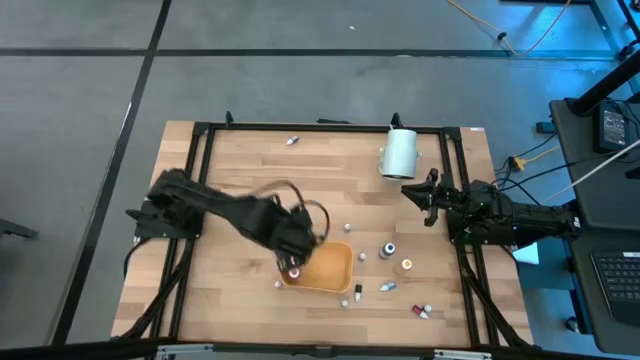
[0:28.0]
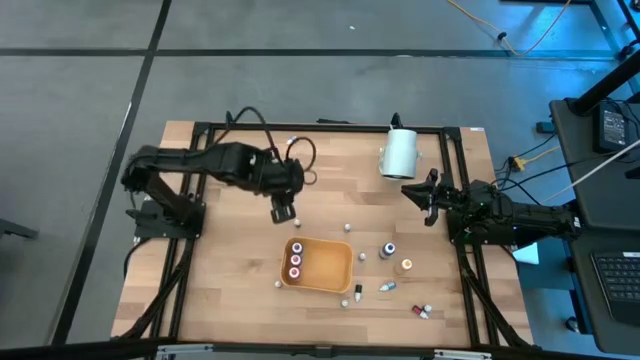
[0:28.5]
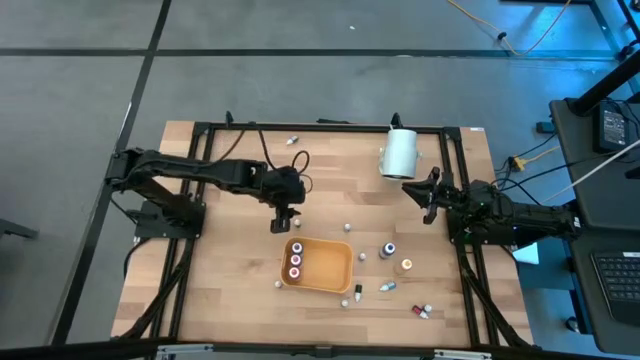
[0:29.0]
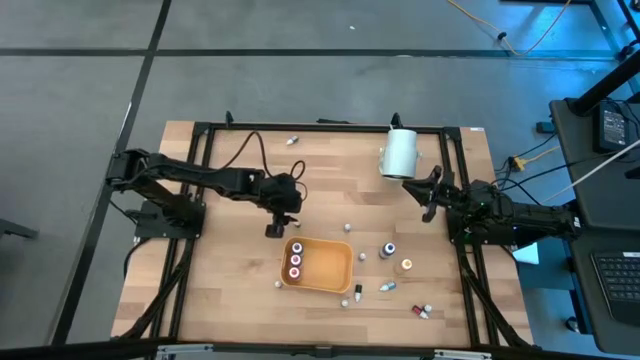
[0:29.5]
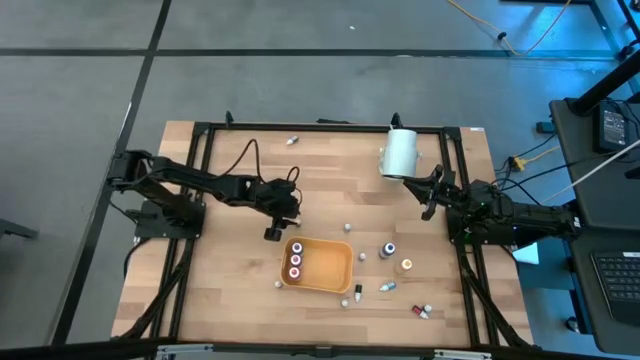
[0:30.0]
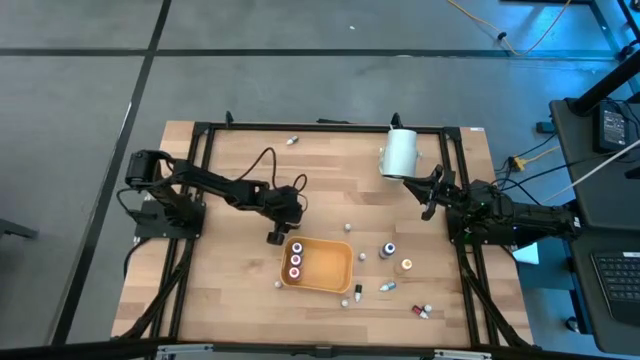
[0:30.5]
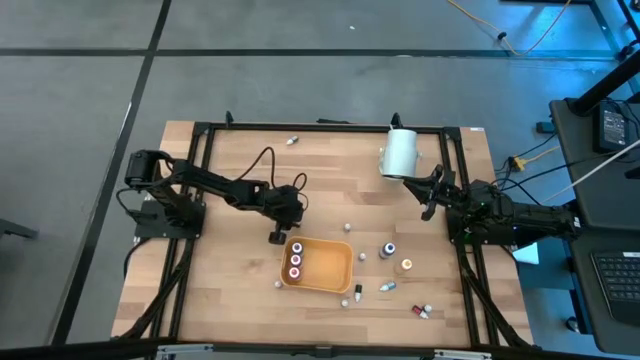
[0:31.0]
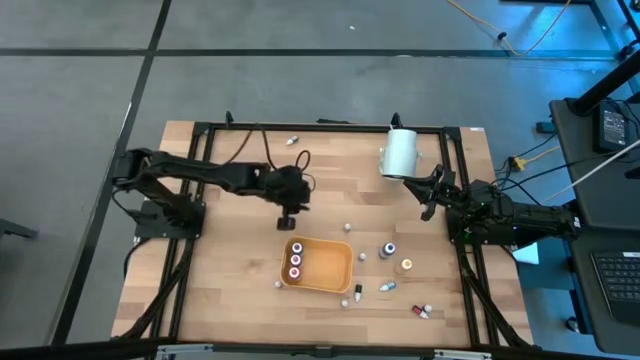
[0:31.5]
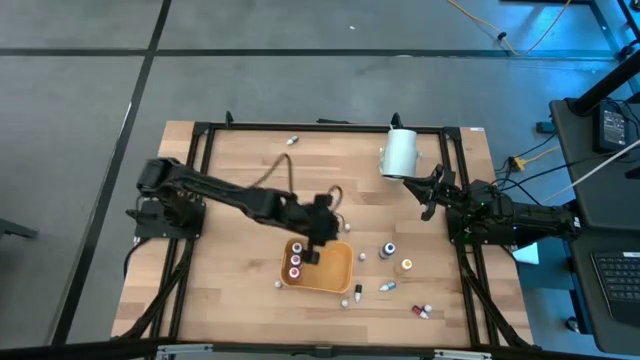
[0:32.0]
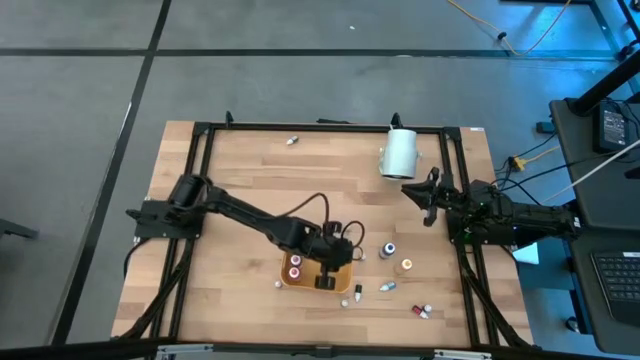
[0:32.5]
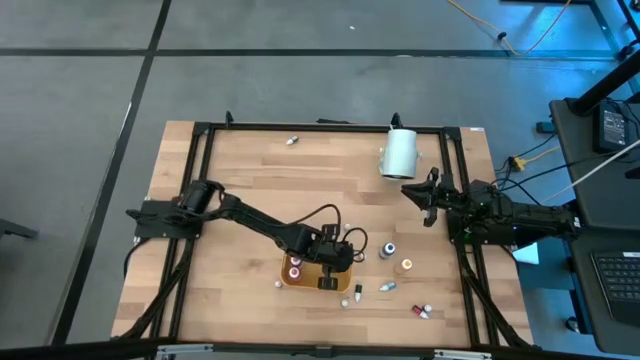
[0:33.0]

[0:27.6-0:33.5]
Task: Pick & Place food coloring
Put the small pink food coloring bottle in the yellow bin

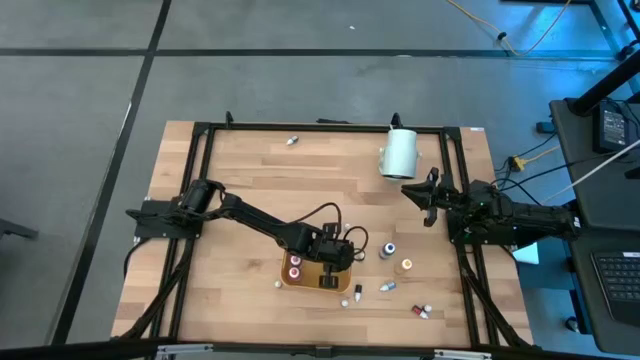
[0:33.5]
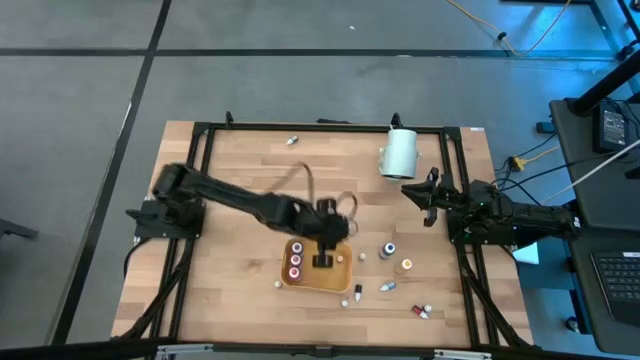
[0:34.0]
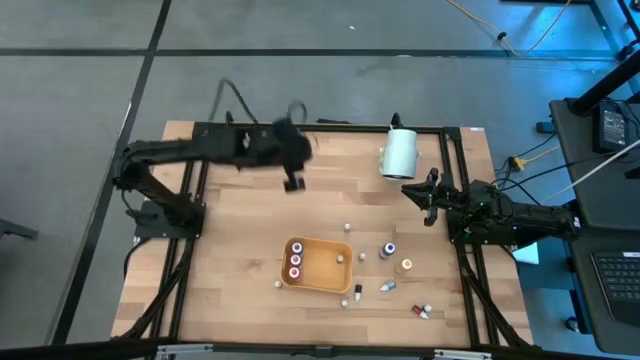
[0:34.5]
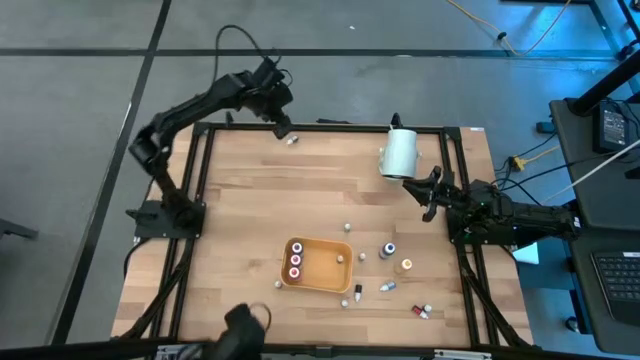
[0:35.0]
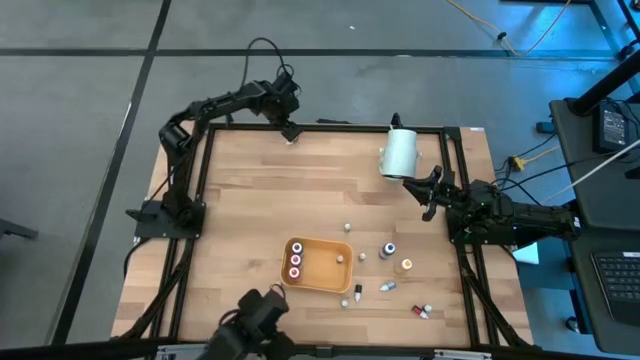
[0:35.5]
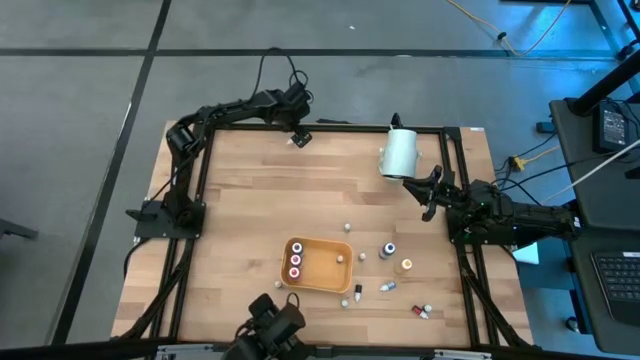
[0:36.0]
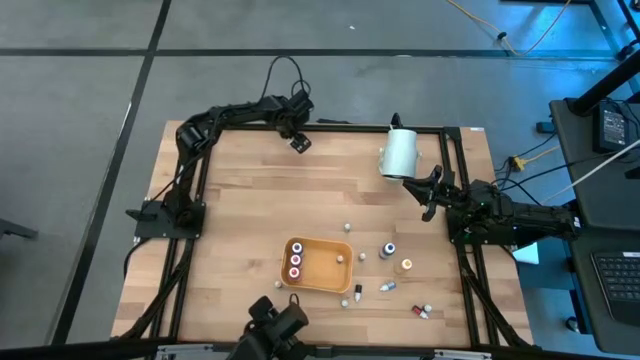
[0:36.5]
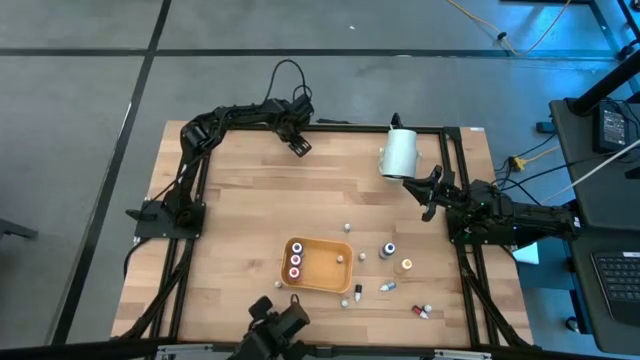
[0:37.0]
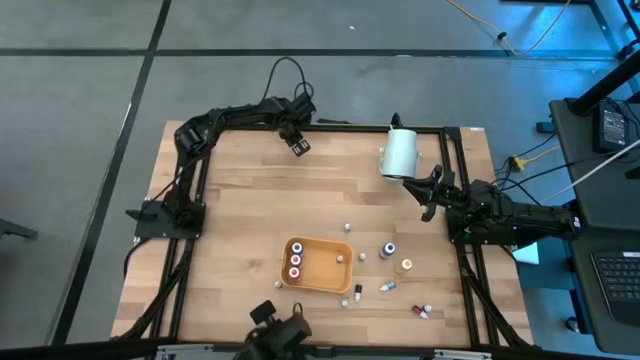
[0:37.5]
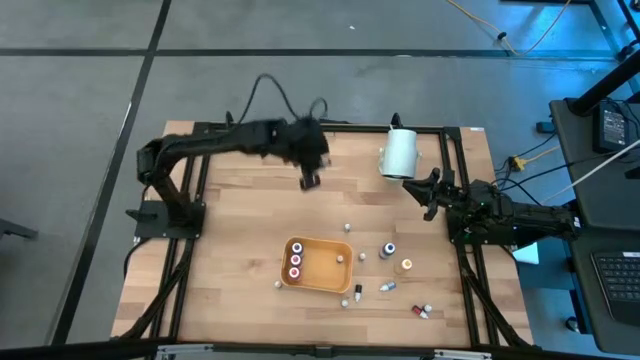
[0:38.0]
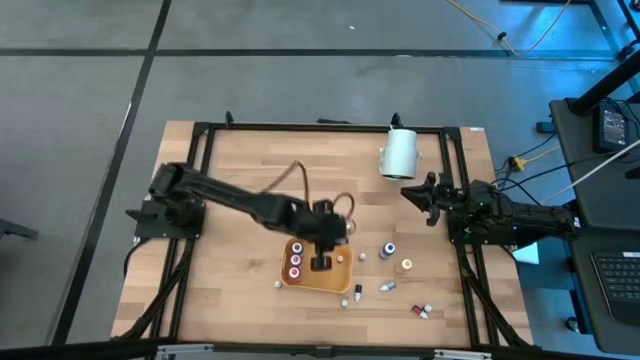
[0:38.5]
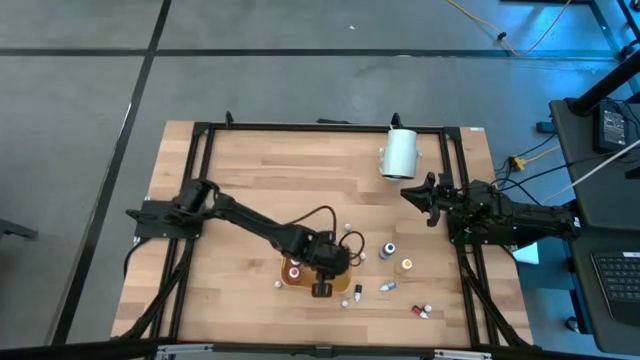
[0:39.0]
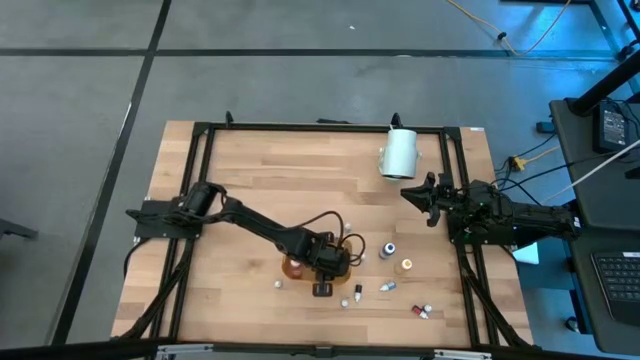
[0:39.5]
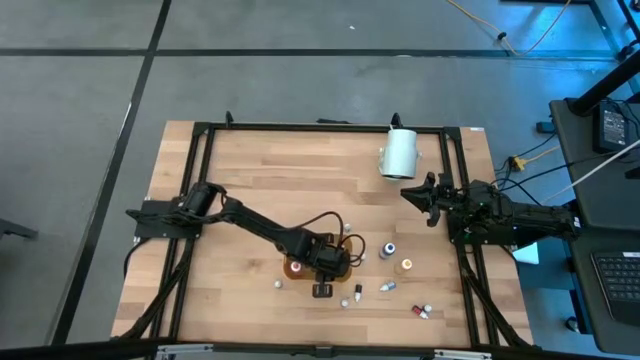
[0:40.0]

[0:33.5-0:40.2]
Put the small purple food coloring bottle in the yellow bin

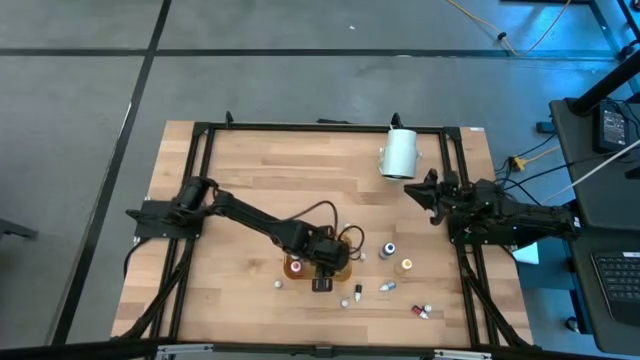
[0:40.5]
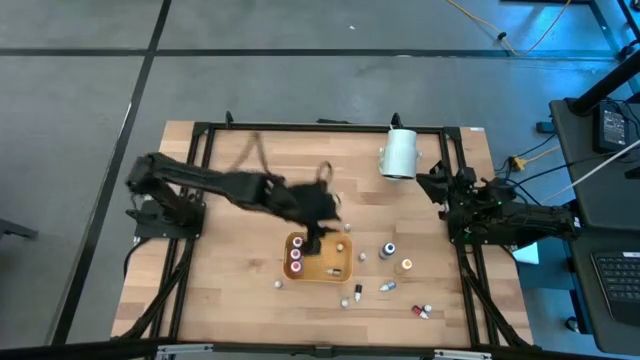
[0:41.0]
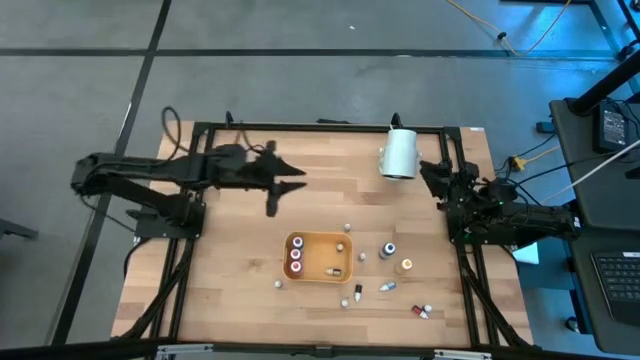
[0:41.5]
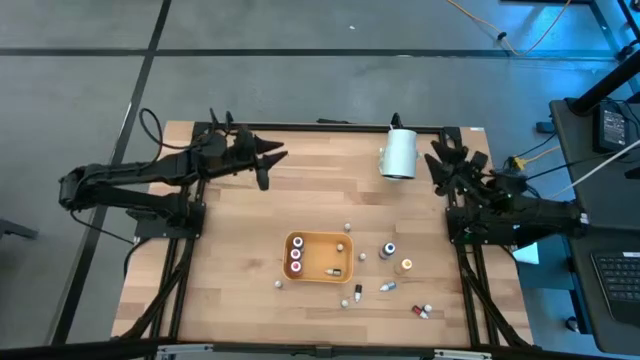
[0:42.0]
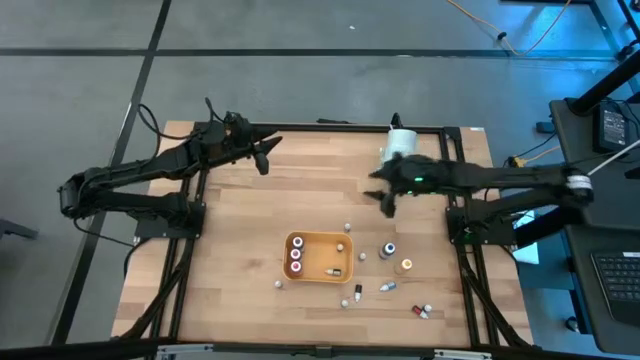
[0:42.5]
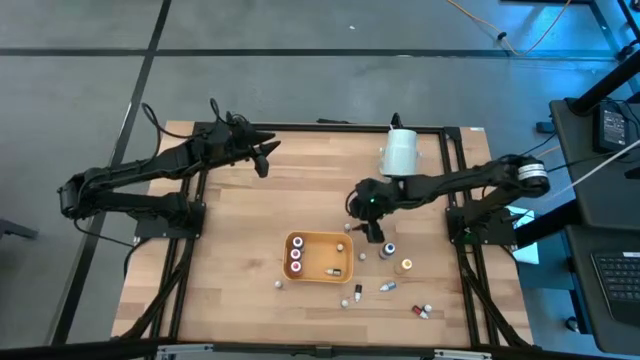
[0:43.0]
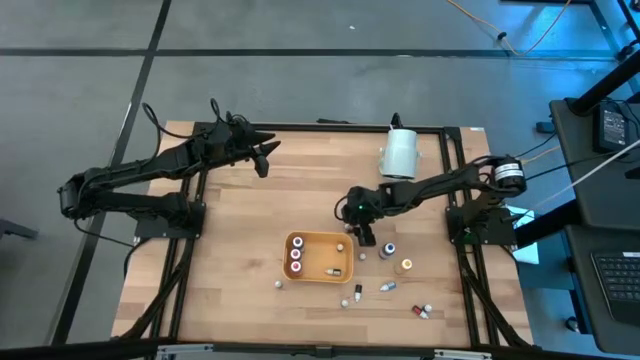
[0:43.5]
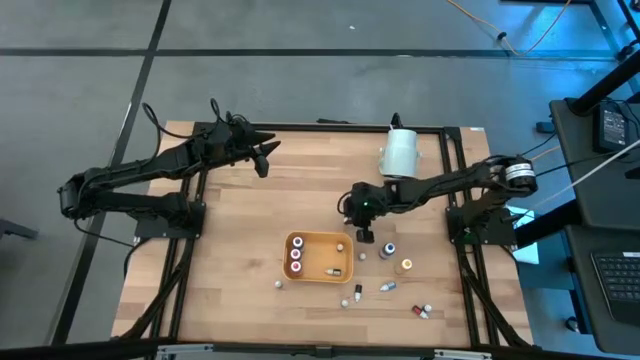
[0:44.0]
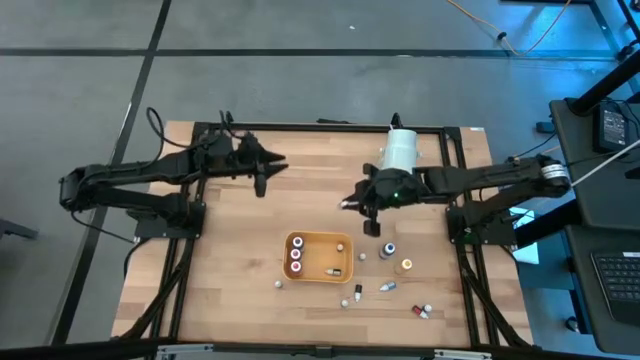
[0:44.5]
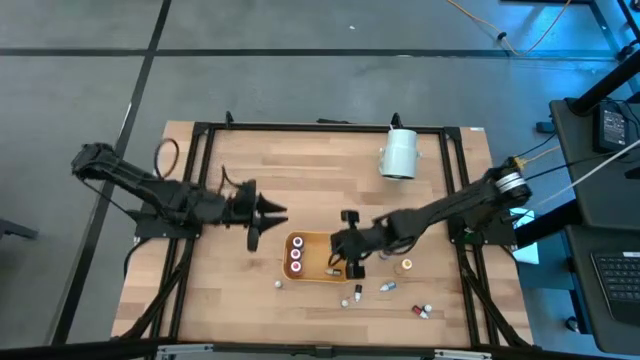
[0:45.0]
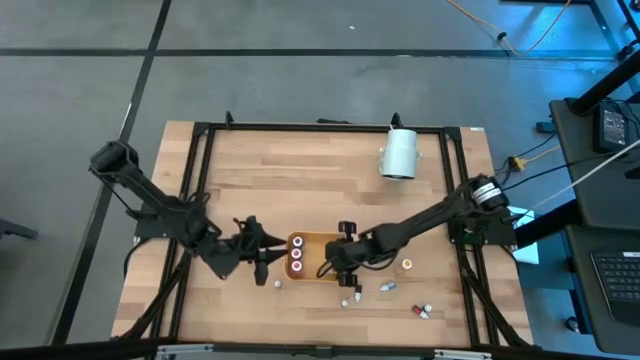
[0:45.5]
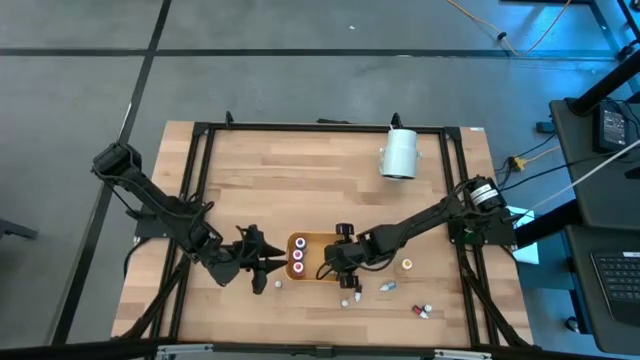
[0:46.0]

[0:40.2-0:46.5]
Put the top small blue food coloring bottle in the yellow bin

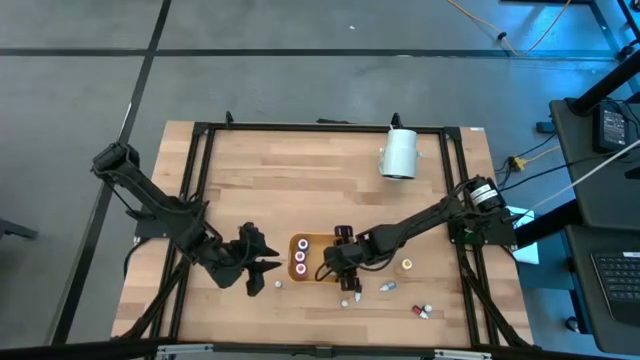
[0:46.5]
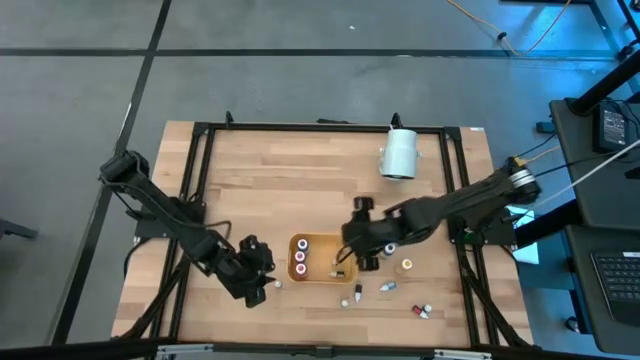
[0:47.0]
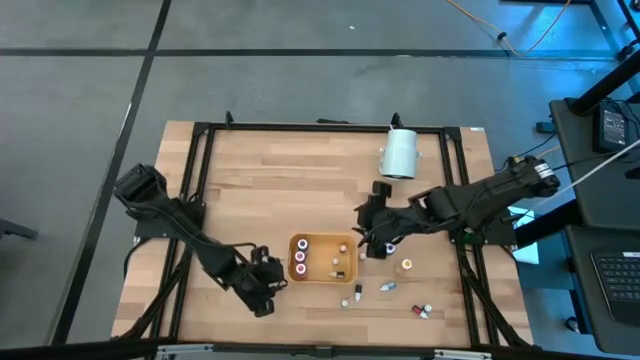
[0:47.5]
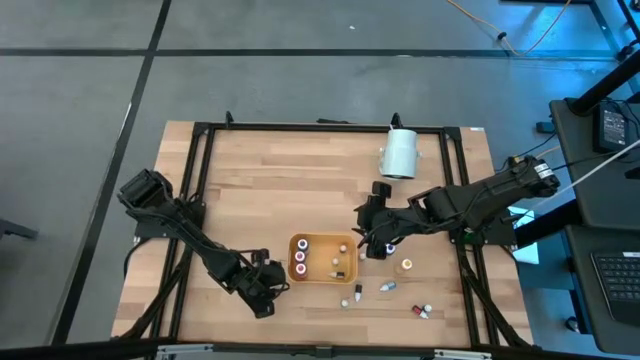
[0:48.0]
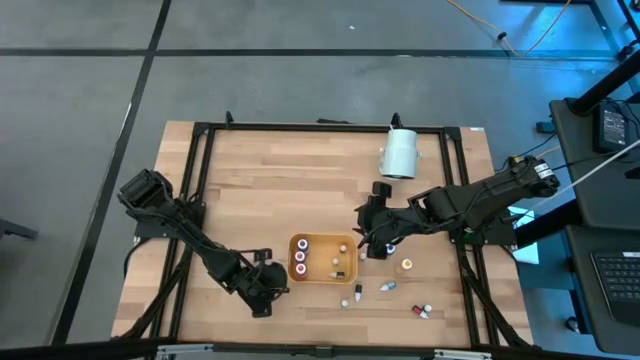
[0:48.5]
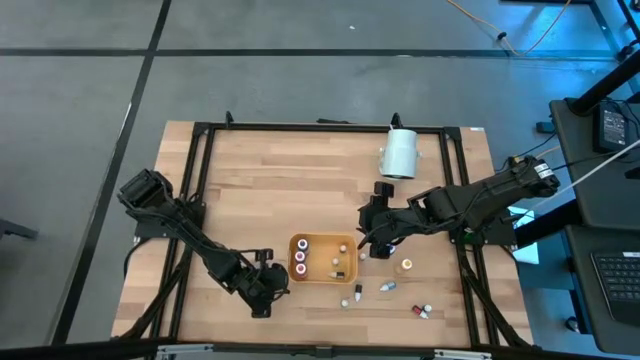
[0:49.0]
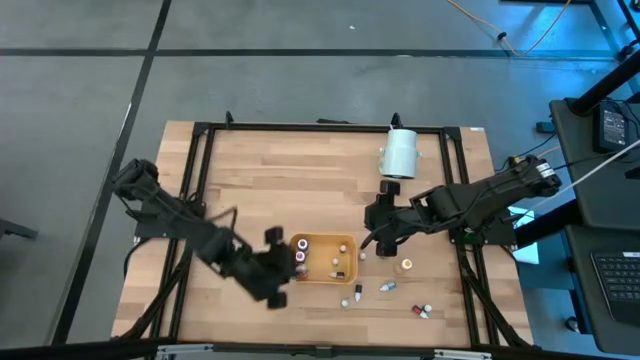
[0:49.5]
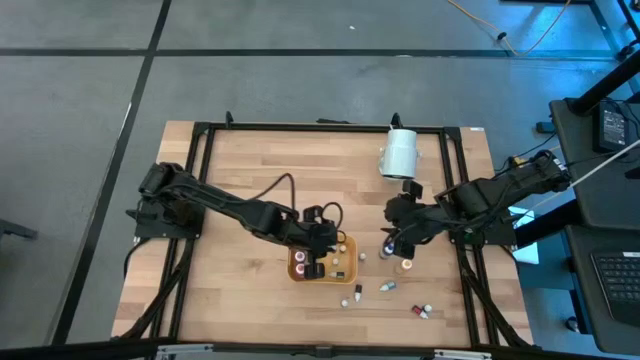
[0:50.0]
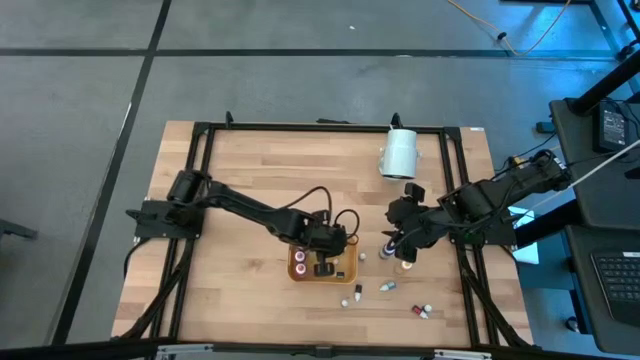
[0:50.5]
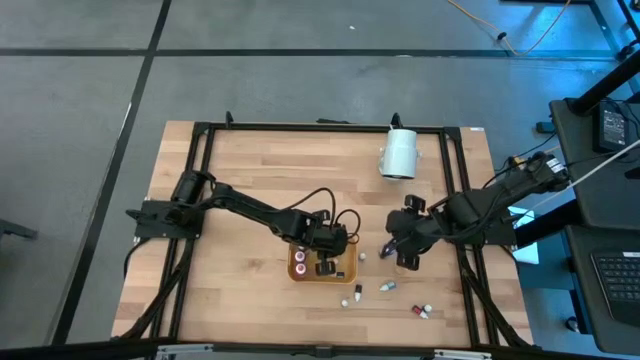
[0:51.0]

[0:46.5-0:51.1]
Put the left small red food coloring bottle in the yellow bin
